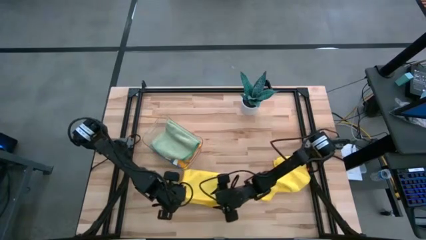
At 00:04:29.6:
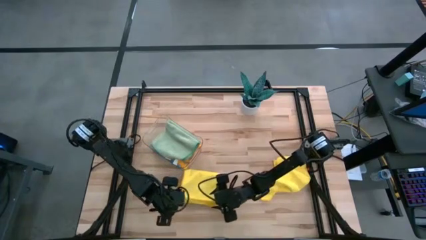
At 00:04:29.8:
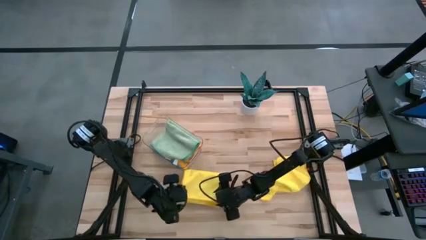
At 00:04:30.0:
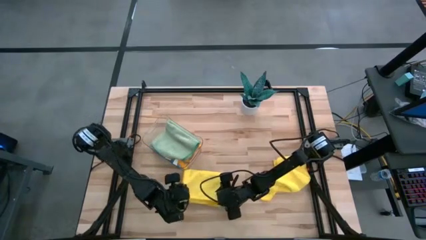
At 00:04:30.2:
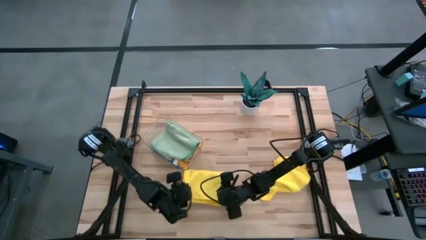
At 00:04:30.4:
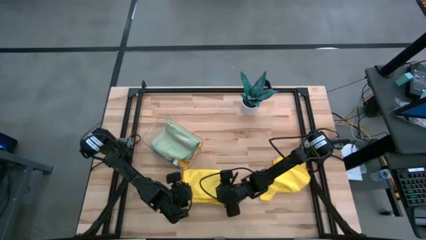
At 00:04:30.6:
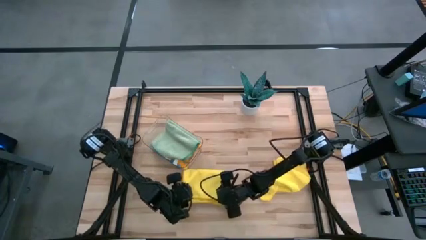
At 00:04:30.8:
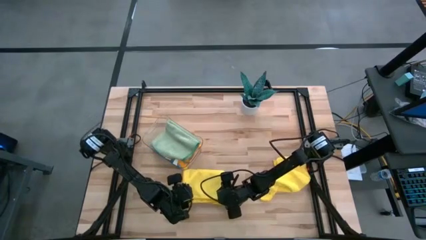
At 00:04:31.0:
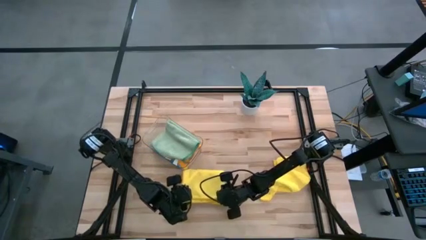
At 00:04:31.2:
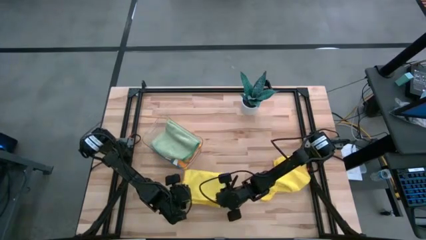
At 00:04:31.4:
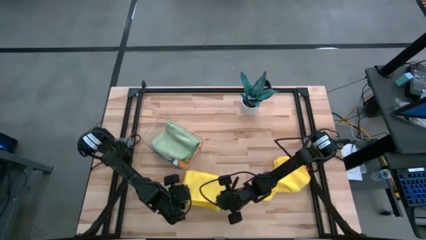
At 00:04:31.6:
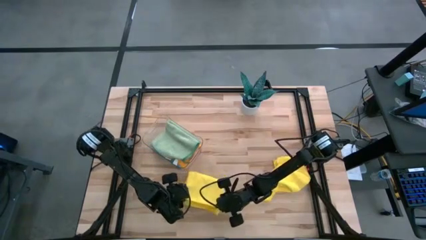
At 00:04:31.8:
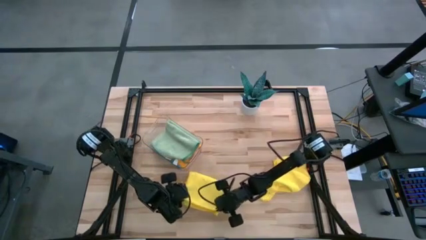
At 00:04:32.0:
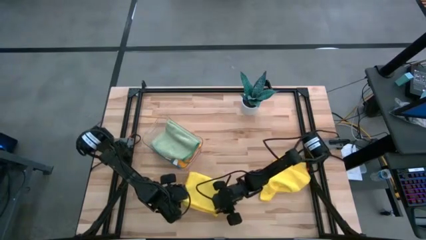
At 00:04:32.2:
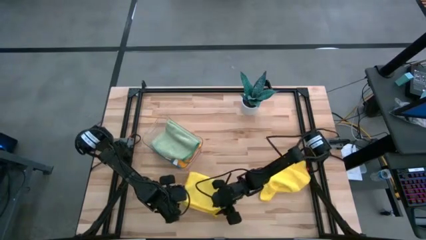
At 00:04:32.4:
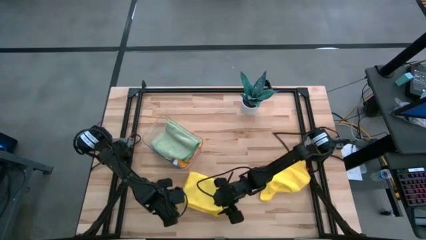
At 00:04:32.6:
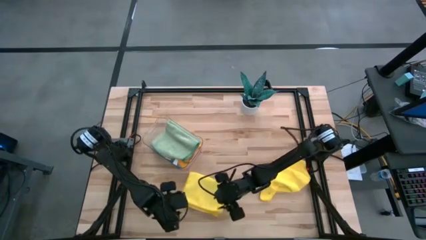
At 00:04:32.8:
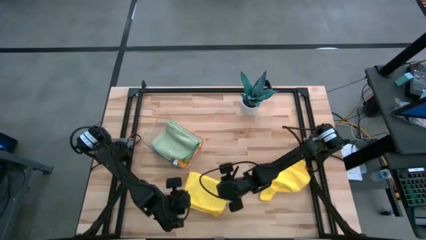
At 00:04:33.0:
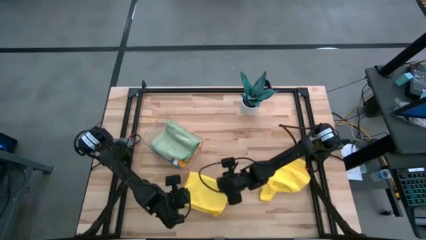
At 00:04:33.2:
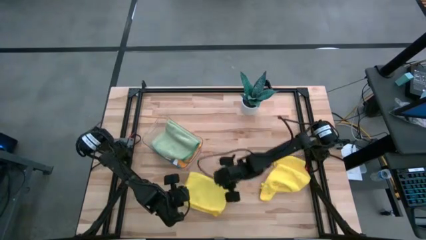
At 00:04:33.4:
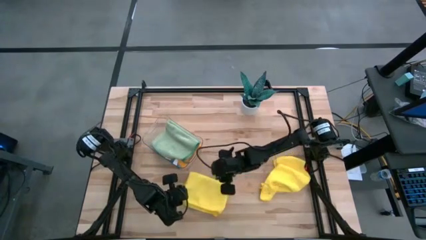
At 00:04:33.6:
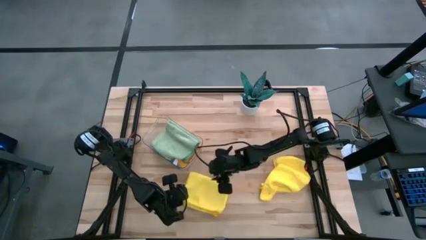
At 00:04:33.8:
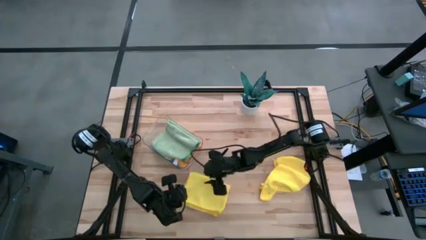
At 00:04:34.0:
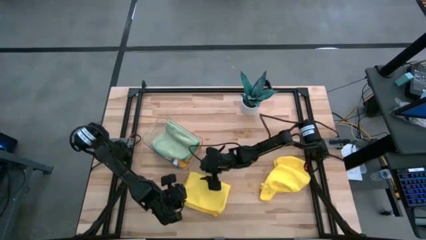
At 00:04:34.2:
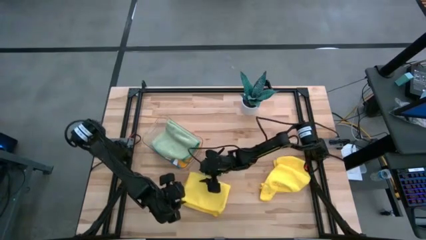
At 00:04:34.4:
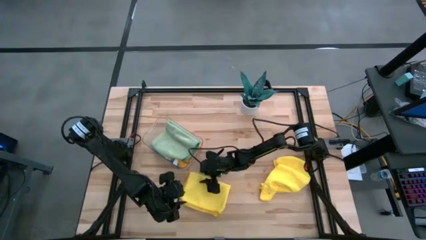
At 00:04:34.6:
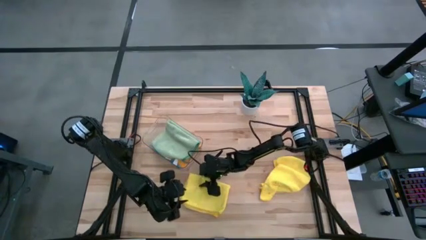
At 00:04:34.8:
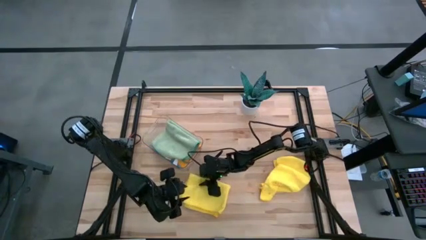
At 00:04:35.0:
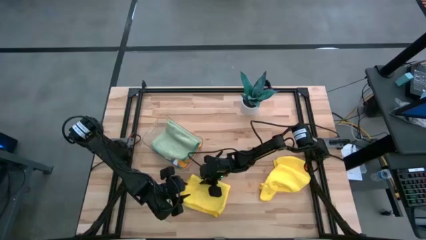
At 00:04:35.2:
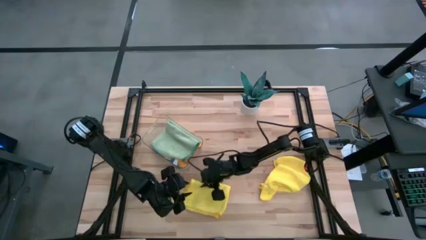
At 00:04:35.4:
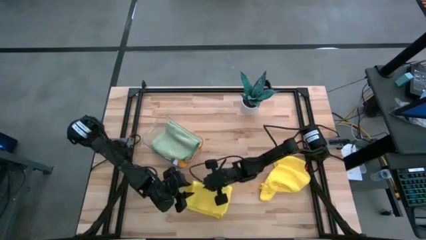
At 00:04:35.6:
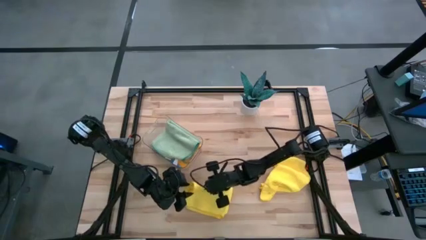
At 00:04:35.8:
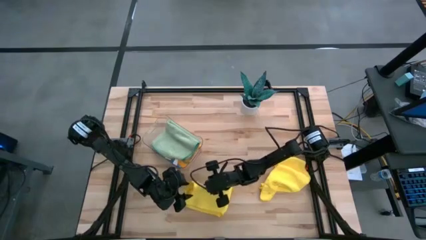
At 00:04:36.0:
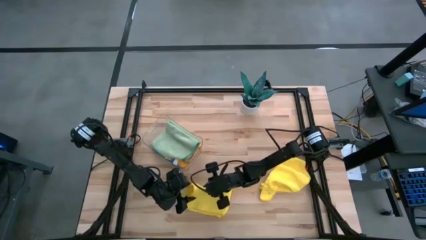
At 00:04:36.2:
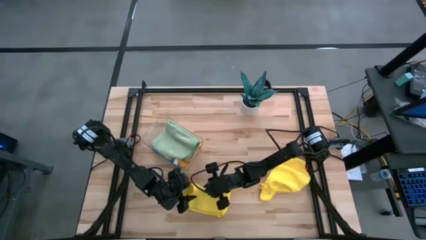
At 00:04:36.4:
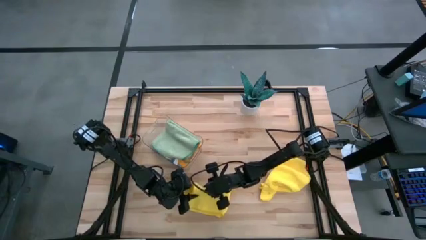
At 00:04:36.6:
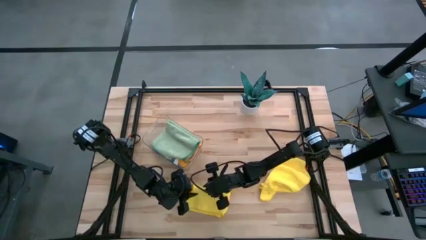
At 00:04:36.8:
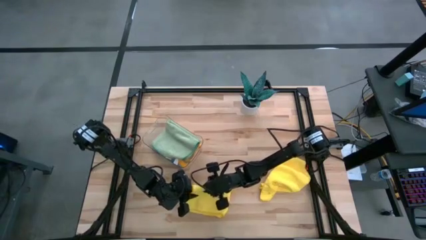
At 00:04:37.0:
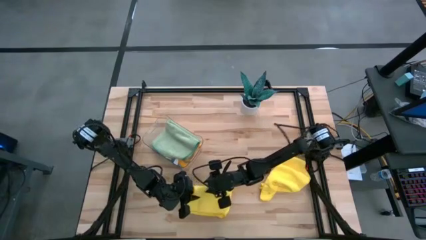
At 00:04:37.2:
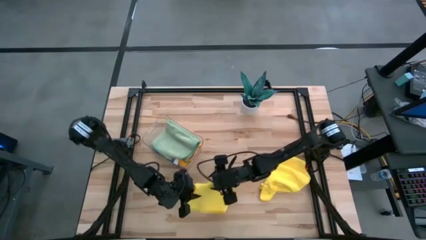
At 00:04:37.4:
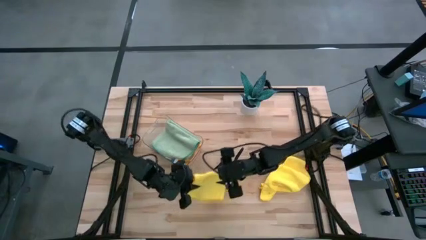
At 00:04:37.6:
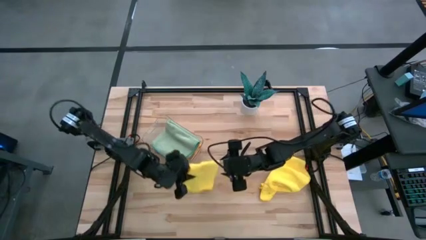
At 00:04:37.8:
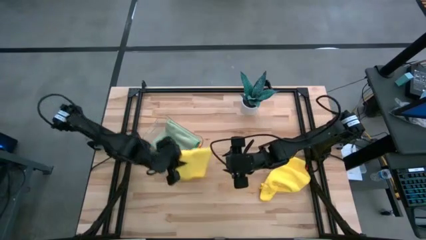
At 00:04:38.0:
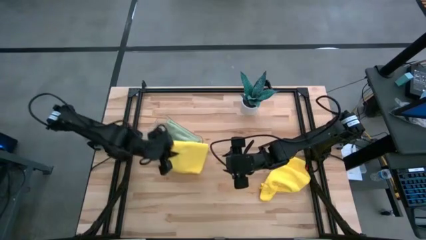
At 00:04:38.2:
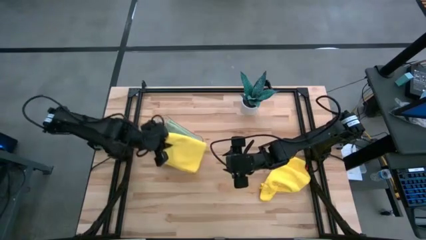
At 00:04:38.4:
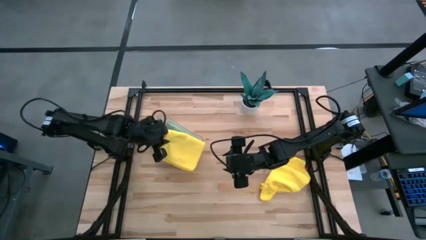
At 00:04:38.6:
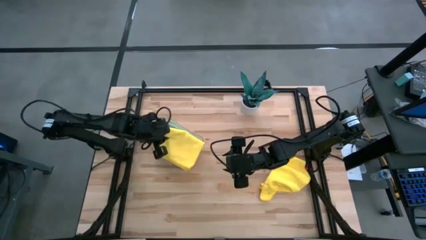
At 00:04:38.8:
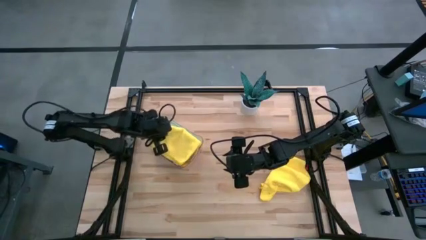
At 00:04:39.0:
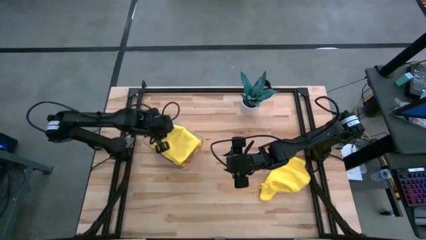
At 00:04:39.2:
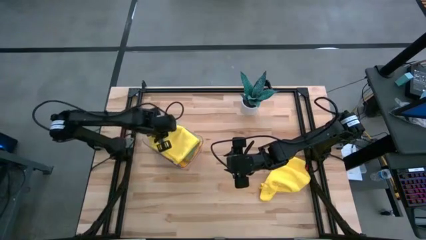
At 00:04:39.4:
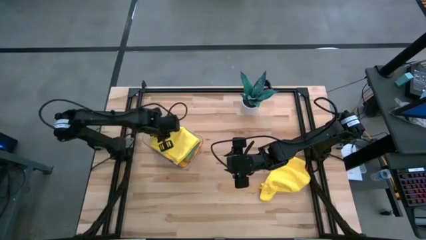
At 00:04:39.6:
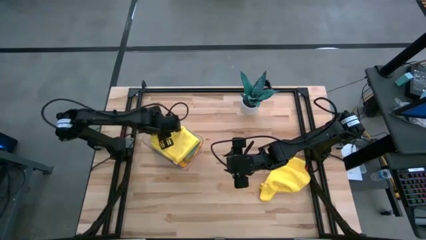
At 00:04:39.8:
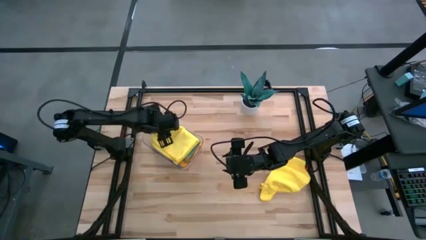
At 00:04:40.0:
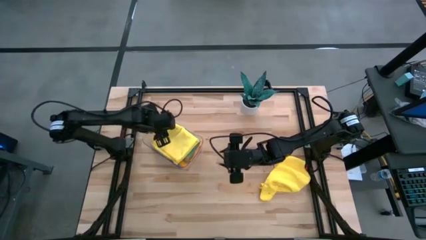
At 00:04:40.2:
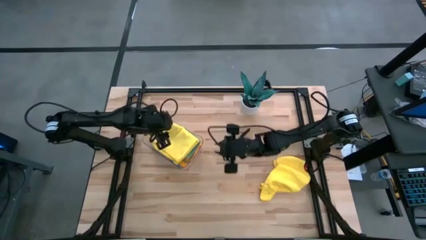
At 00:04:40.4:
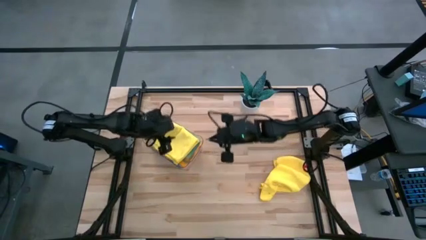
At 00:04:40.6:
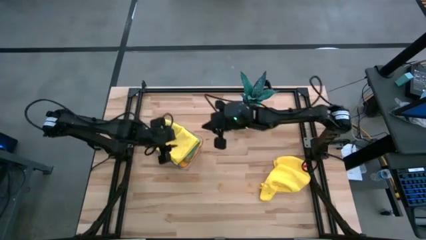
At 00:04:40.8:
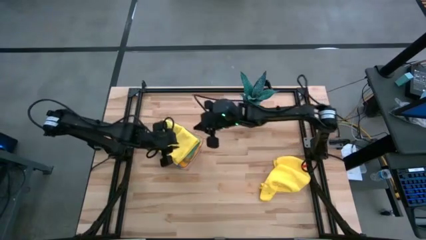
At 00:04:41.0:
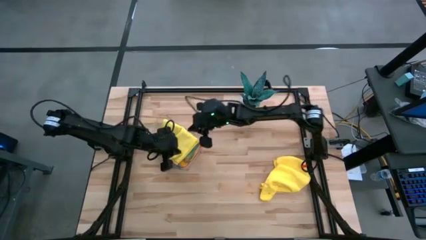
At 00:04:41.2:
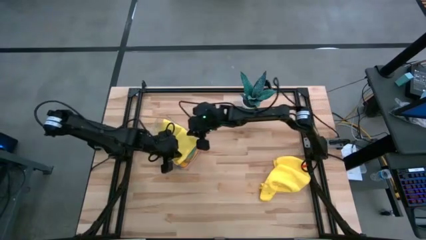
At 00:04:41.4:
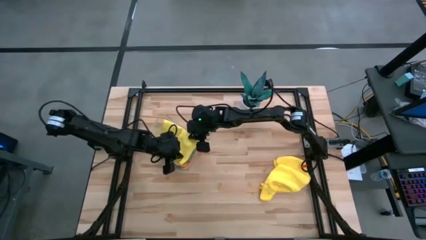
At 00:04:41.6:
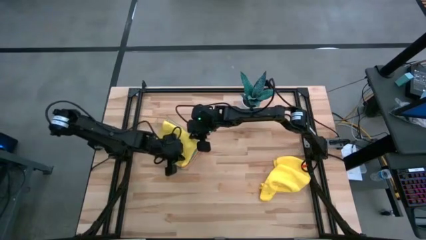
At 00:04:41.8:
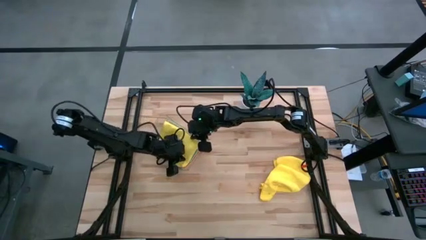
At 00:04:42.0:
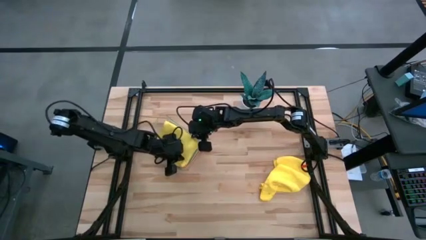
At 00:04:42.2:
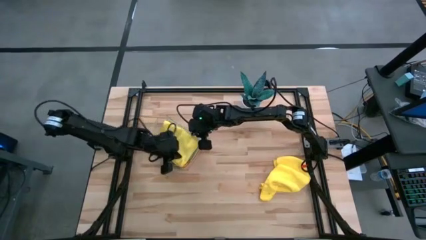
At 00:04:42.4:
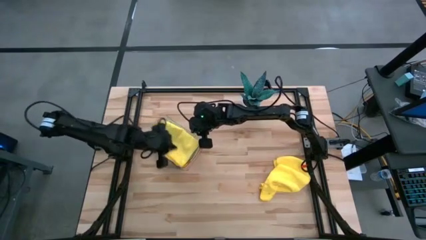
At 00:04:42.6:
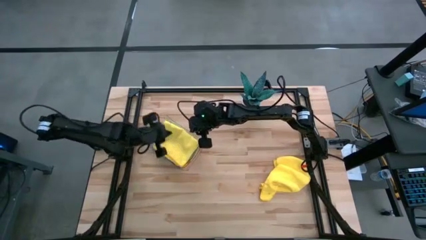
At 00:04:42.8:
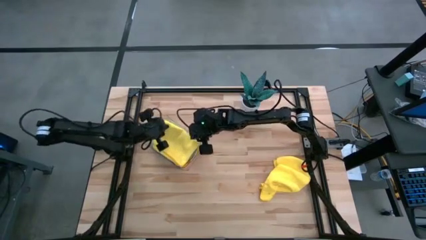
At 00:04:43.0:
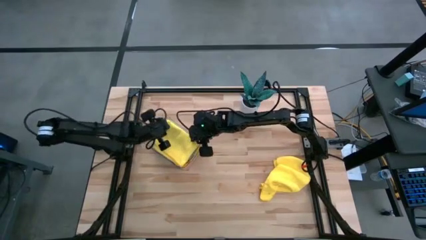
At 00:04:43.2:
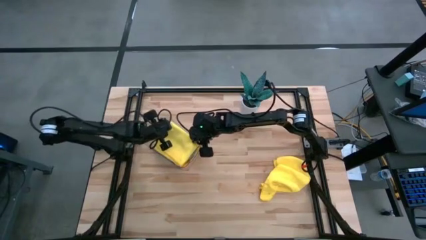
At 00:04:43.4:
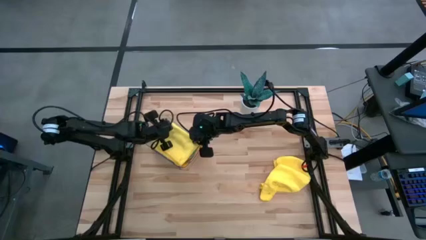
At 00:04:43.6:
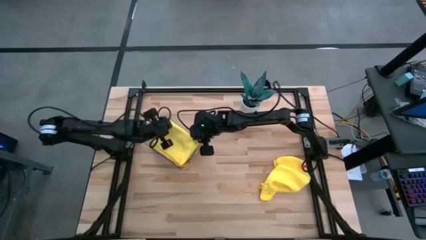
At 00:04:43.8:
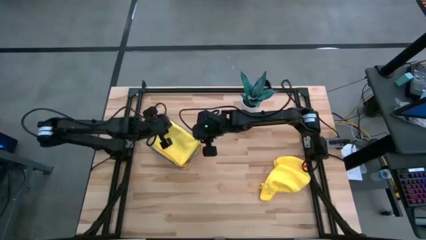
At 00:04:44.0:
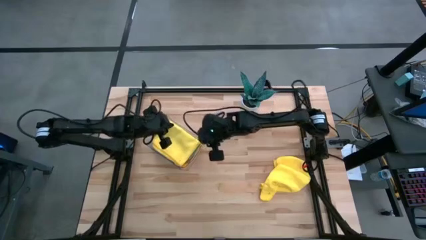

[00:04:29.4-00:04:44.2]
Task: Fold microfiber towels
Put the yellow microfiber cloth into the transparent bin
